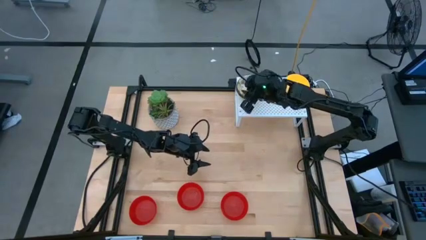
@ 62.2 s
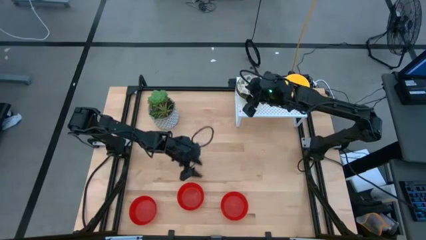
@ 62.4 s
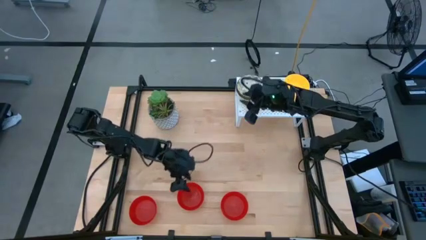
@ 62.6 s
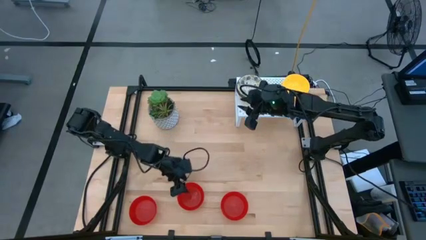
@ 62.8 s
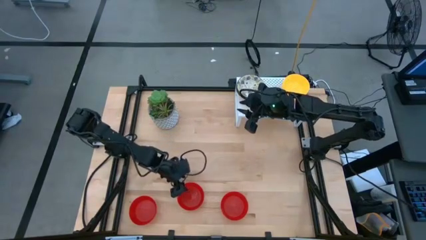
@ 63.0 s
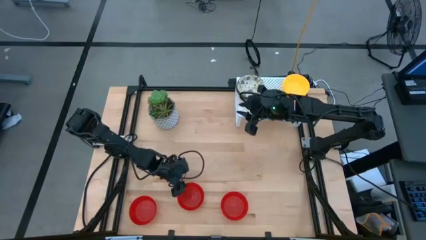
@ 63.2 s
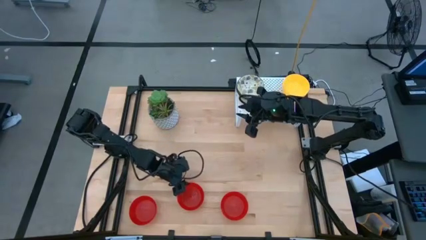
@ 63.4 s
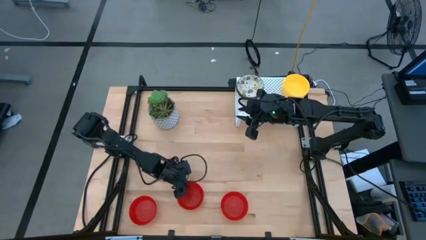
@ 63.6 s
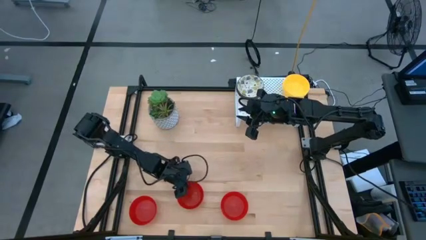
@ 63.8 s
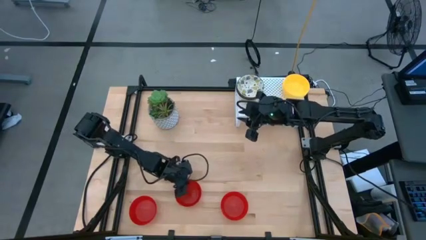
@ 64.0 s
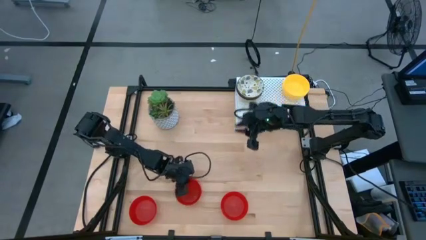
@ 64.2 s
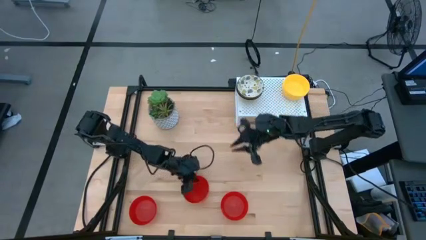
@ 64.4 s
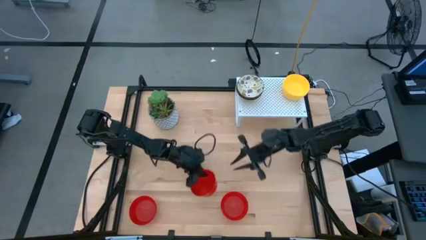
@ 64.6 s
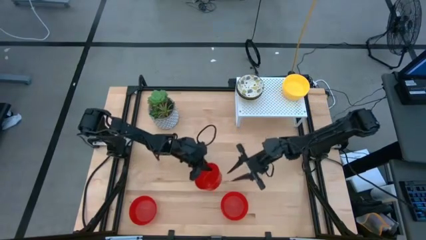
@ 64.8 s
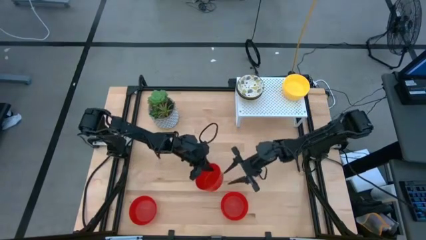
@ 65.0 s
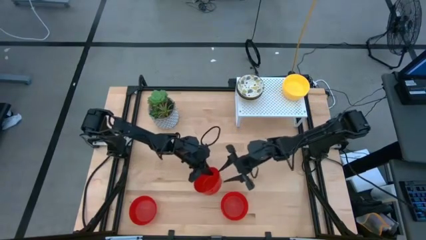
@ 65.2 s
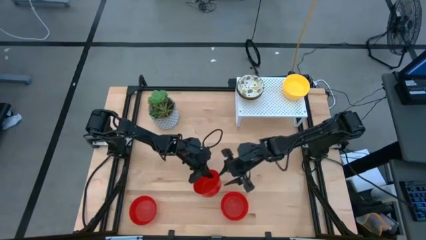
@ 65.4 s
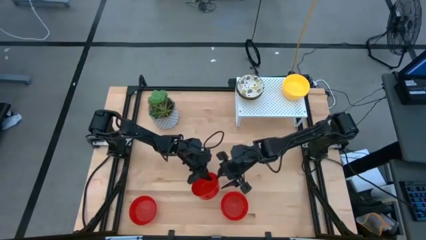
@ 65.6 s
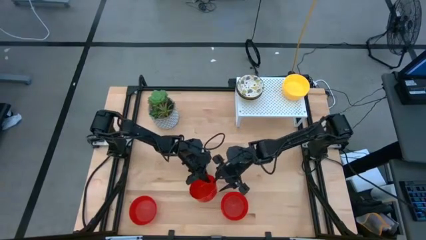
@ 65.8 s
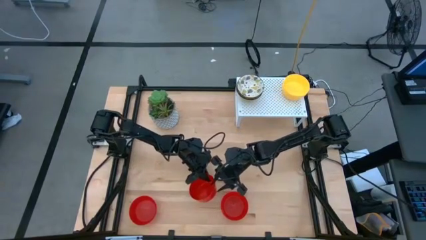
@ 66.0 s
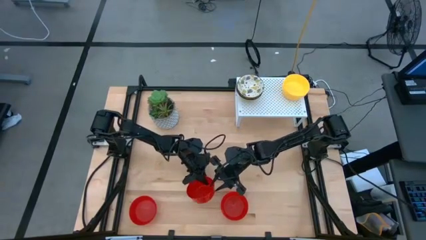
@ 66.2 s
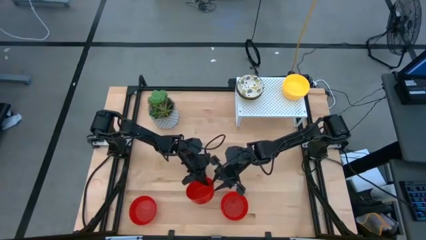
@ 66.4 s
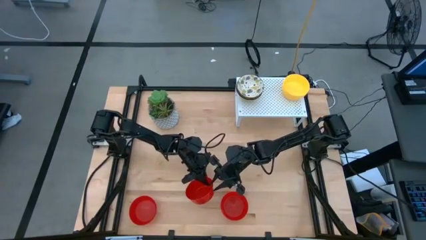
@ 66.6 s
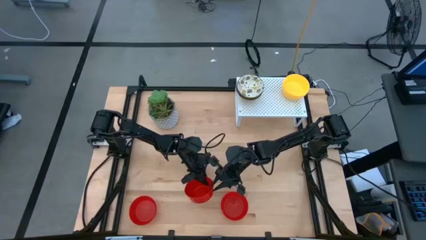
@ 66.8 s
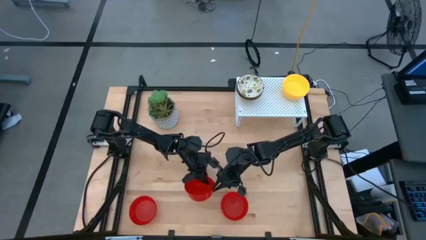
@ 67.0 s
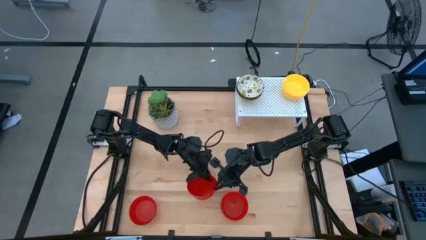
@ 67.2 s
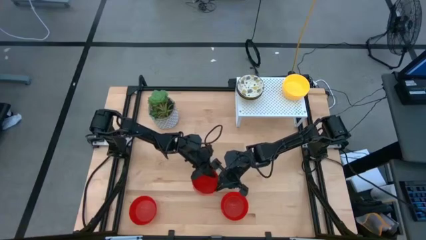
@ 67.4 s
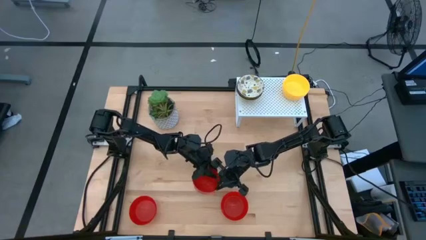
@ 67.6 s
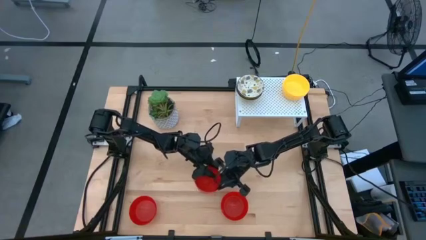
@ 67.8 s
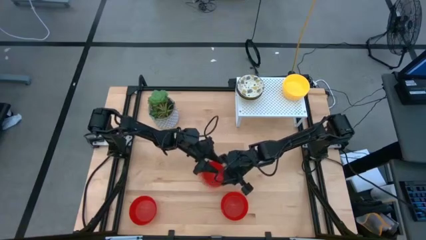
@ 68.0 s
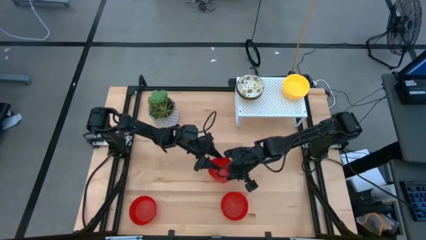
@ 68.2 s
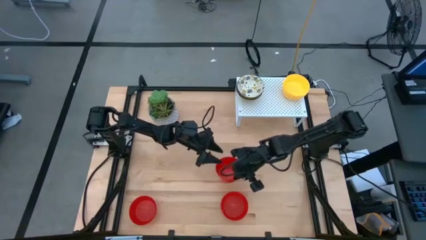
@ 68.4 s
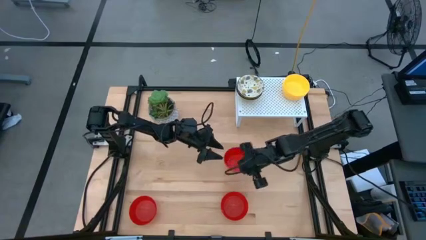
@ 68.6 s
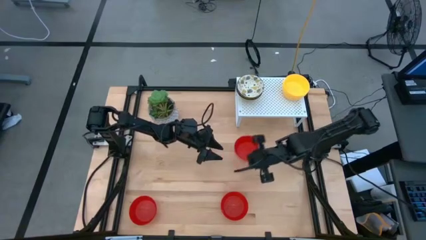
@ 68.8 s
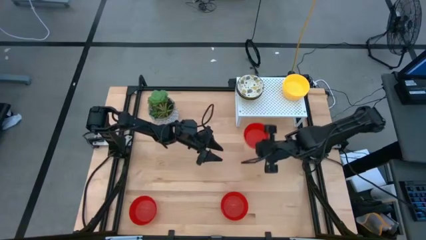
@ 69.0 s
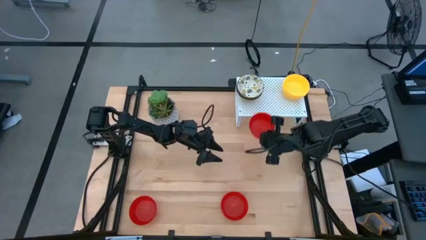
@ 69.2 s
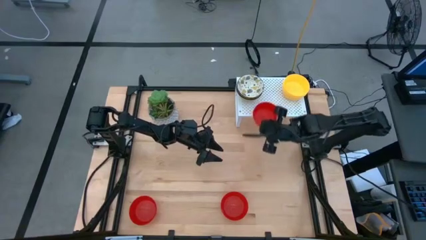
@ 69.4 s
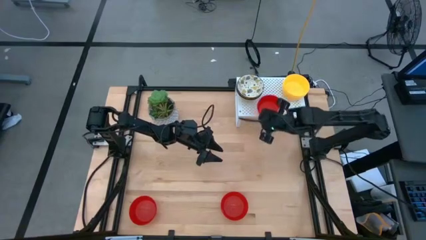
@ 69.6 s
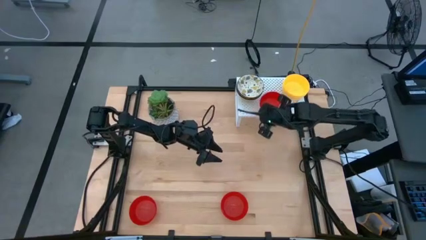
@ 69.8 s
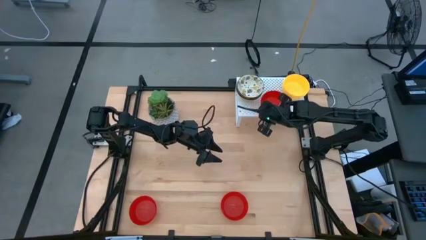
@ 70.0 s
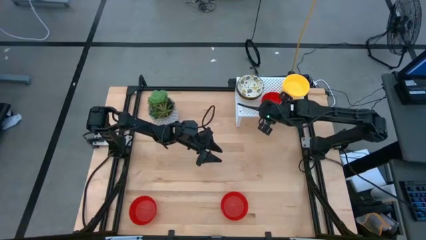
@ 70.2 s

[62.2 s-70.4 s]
Task: Pick & Place Mini bowls
Put the red bowl on the shelf

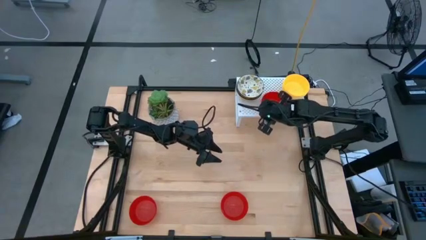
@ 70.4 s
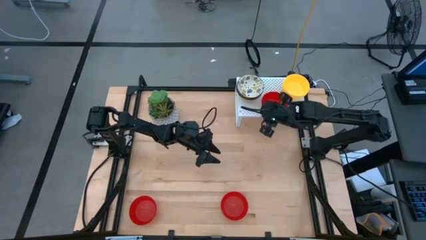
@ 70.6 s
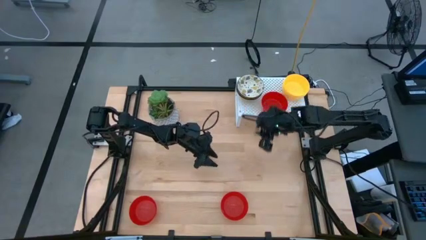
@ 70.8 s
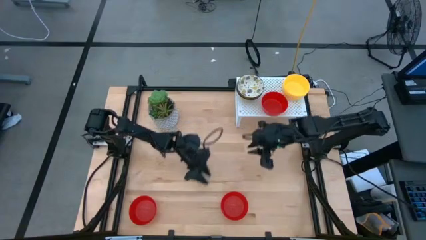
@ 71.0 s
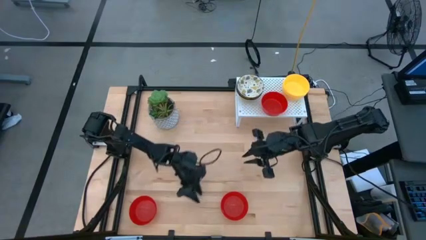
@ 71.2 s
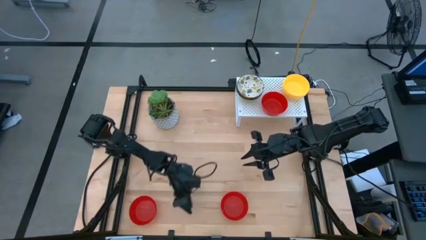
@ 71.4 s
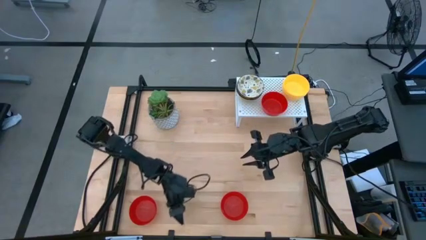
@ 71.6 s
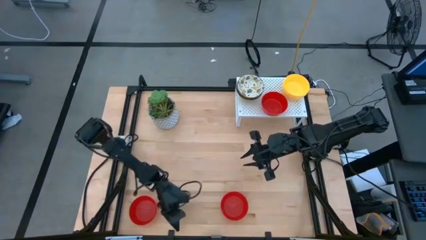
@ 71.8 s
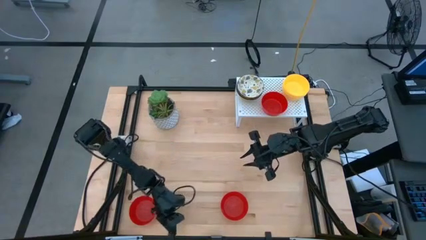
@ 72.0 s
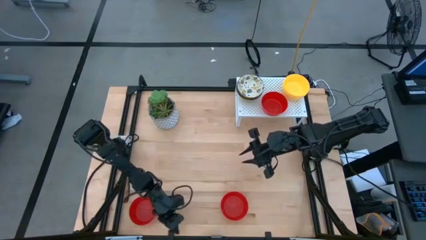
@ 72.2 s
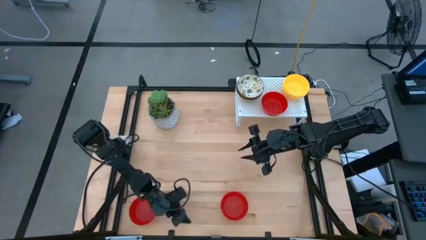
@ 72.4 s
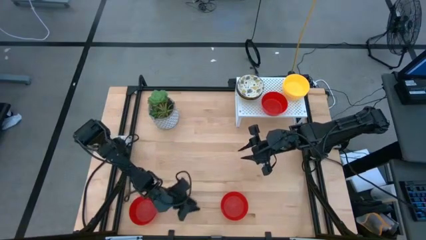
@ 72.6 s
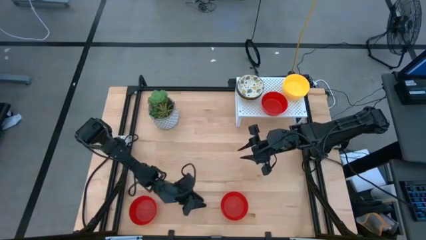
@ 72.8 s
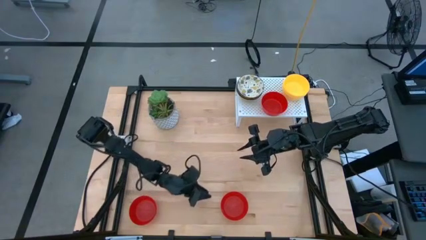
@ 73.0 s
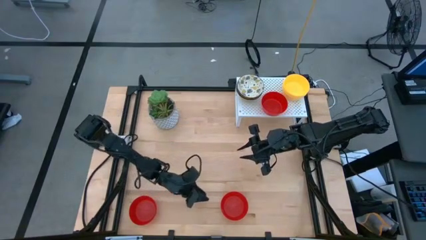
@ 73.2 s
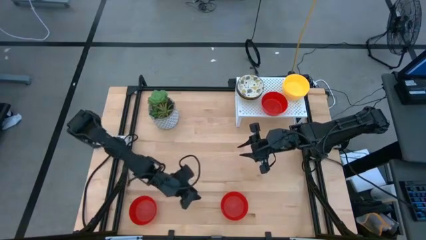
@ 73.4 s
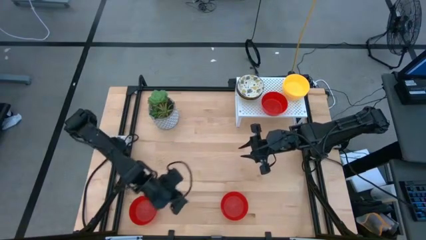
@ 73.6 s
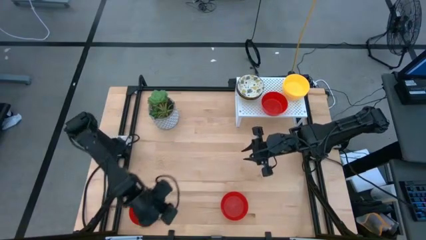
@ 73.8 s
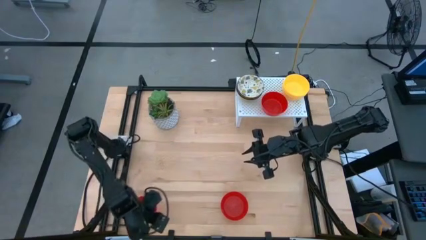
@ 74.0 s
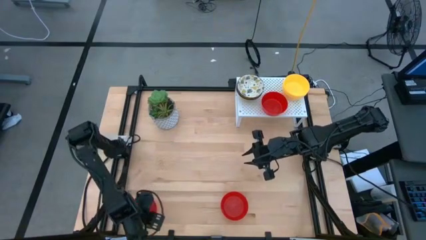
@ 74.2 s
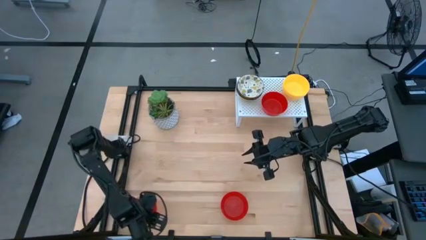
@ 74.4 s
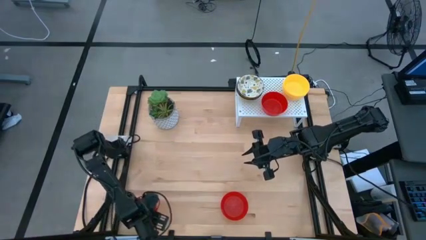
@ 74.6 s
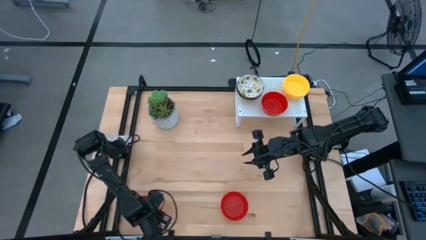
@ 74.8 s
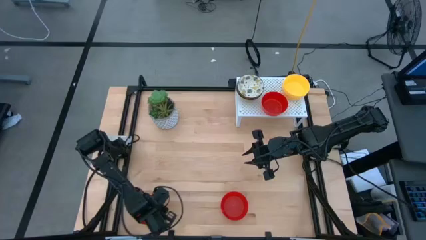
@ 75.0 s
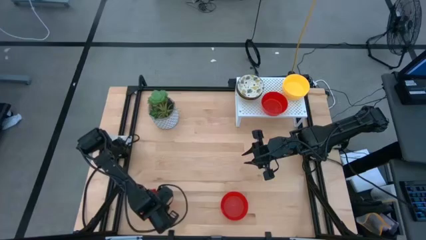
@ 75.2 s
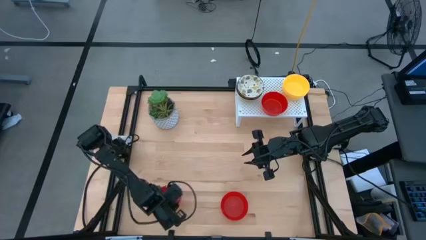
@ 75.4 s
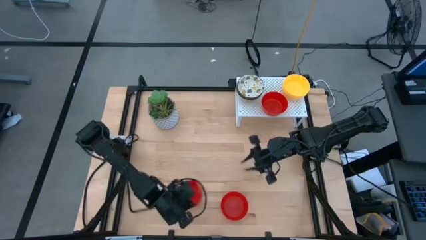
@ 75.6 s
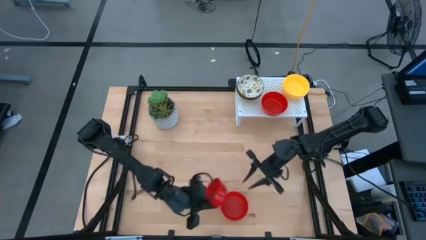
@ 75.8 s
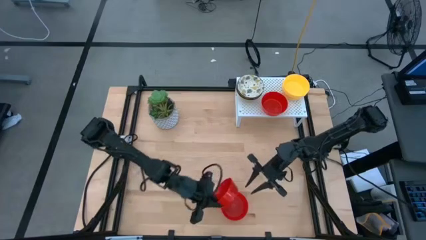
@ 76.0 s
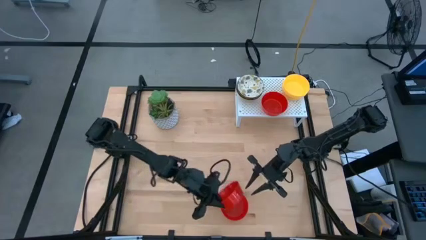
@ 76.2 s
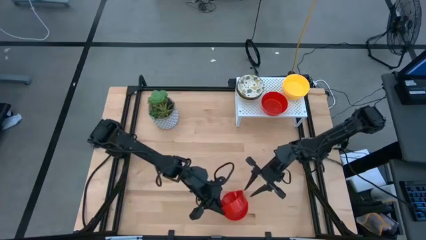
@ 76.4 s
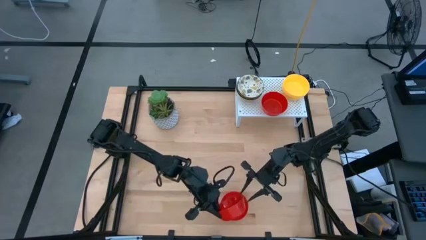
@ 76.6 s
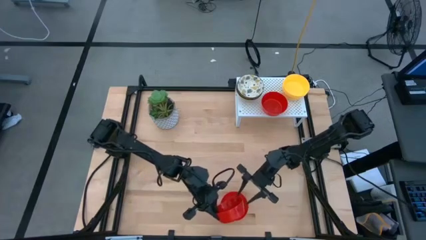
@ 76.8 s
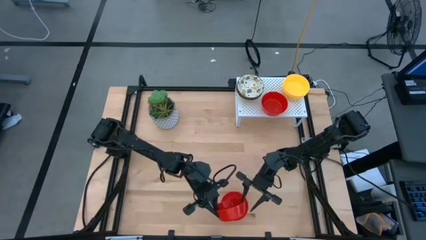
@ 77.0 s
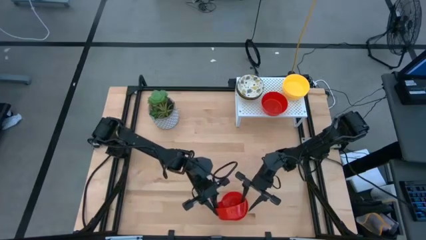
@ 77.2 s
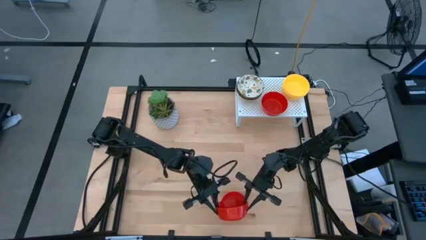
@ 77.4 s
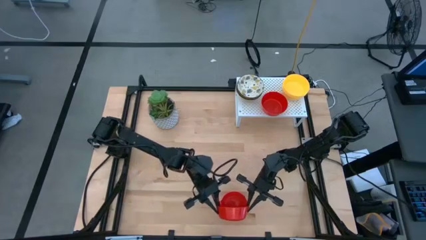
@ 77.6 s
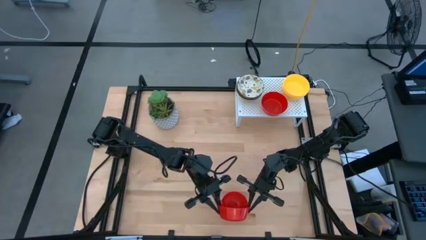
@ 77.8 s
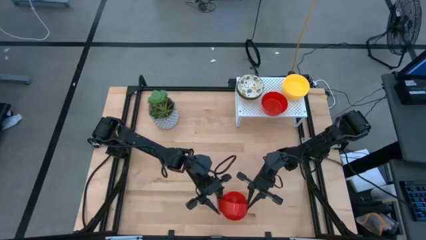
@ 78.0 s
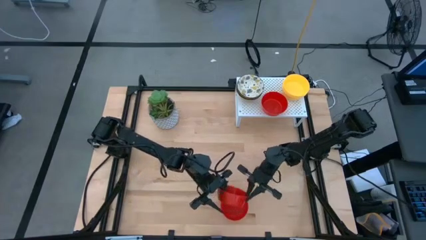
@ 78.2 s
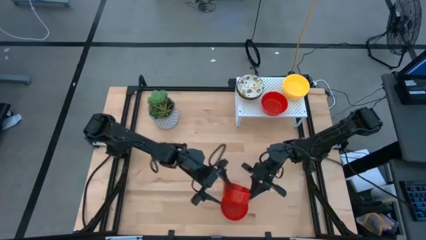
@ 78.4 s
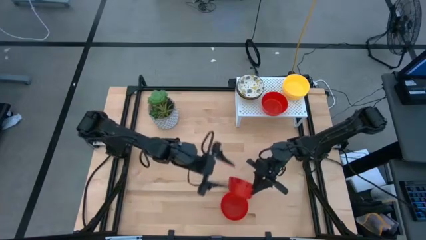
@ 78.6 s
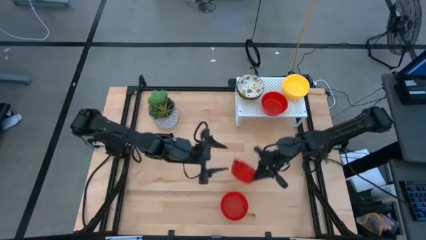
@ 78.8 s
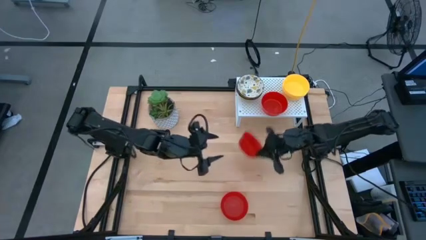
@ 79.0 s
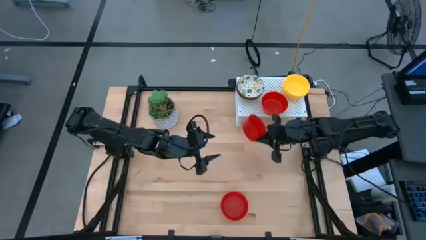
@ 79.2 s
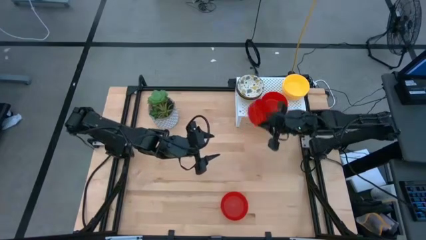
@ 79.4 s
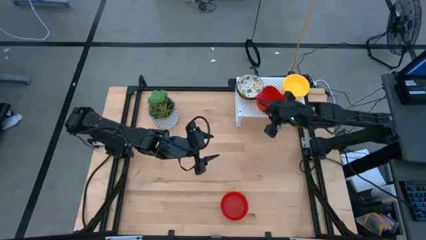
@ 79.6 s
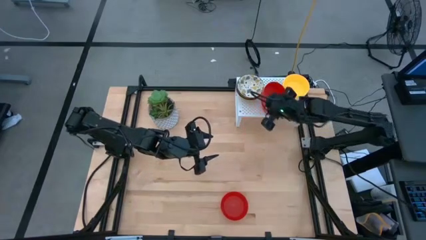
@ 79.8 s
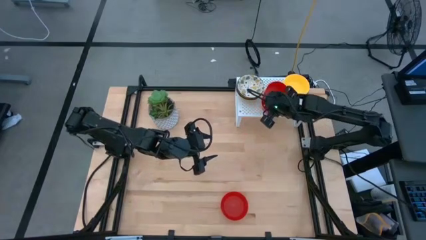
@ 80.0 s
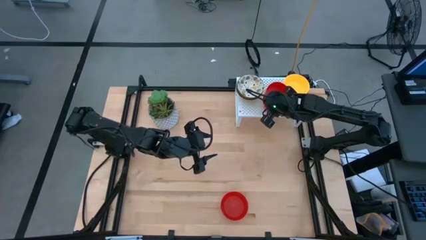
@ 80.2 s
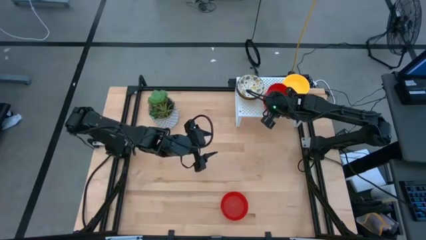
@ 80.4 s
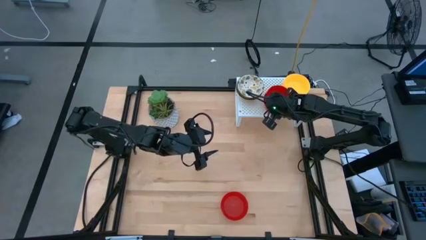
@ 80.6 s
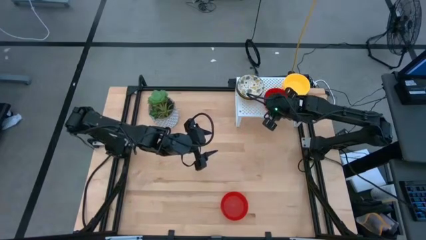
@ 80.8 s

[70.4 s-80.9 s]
Stack the red bowl on top of the red bowl on the shelf
